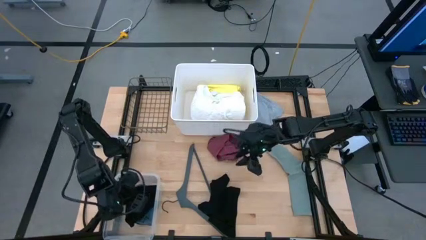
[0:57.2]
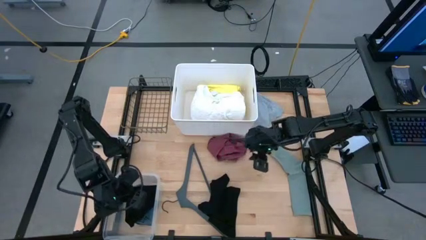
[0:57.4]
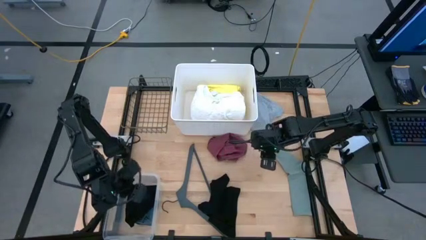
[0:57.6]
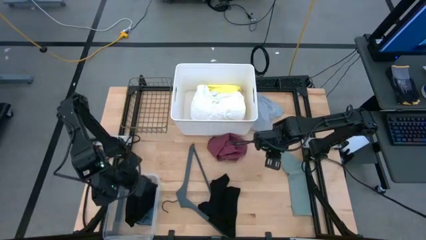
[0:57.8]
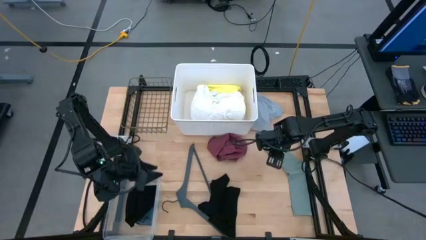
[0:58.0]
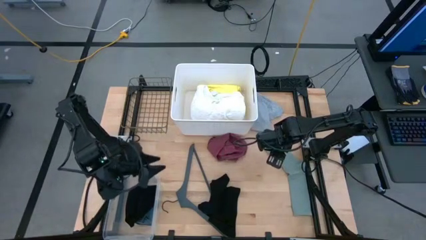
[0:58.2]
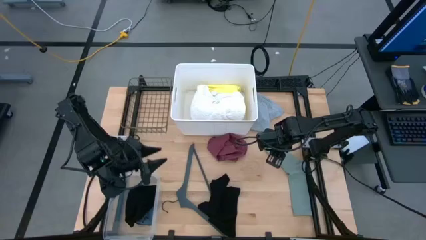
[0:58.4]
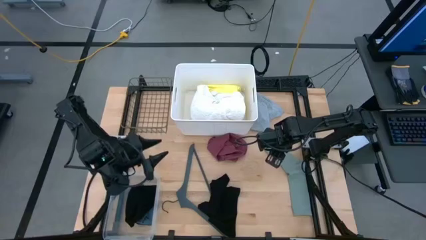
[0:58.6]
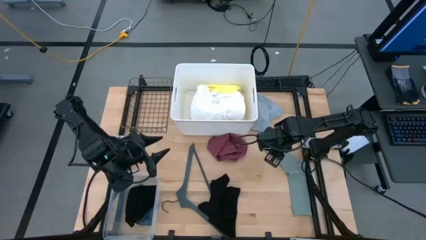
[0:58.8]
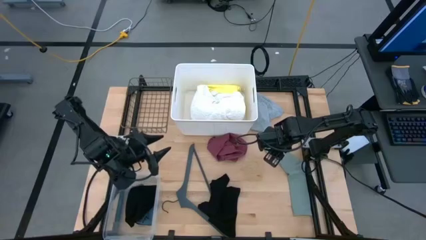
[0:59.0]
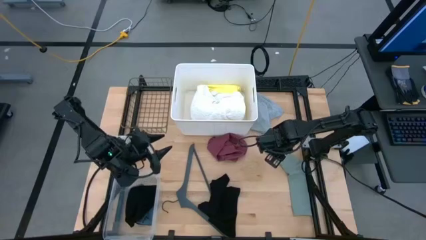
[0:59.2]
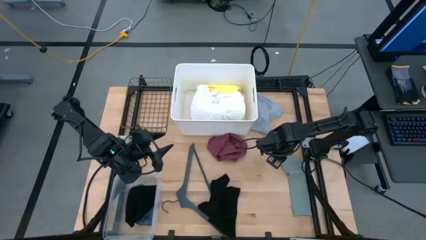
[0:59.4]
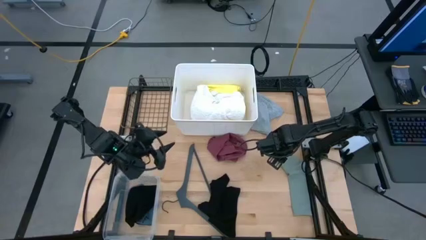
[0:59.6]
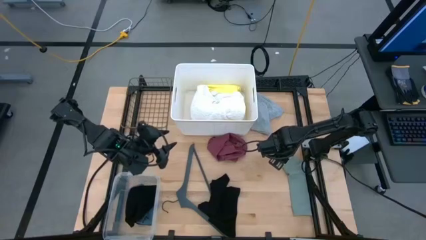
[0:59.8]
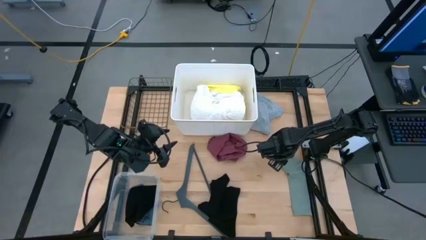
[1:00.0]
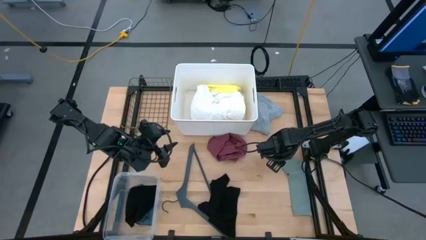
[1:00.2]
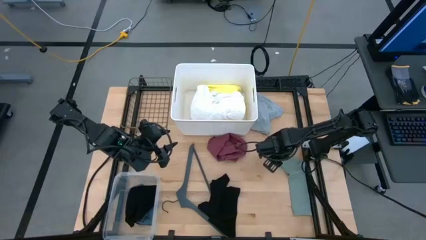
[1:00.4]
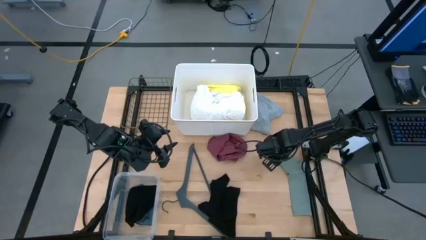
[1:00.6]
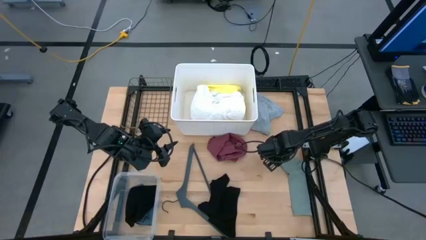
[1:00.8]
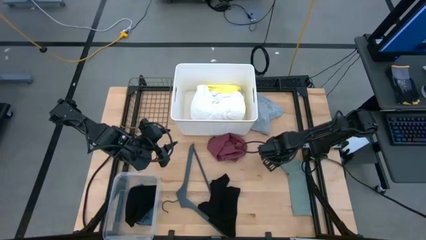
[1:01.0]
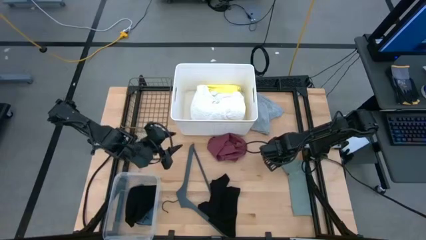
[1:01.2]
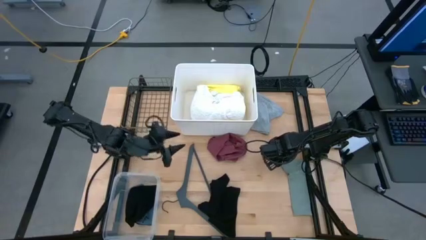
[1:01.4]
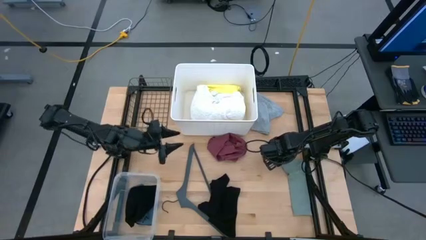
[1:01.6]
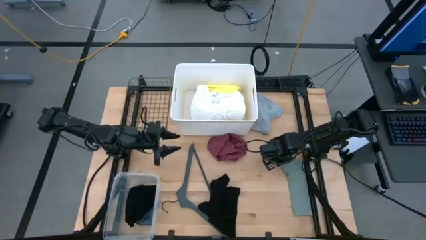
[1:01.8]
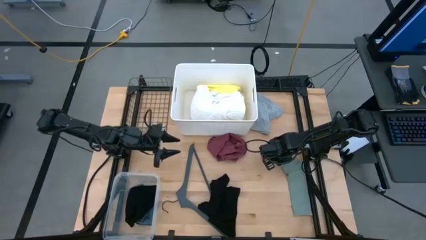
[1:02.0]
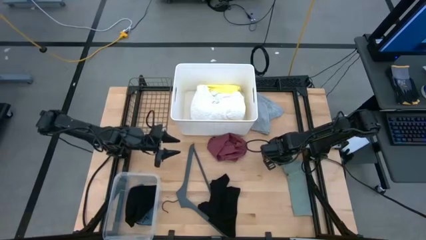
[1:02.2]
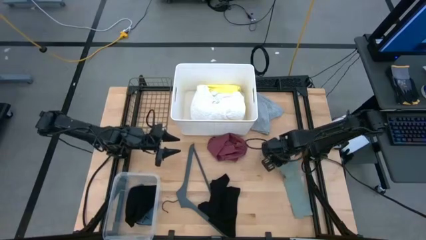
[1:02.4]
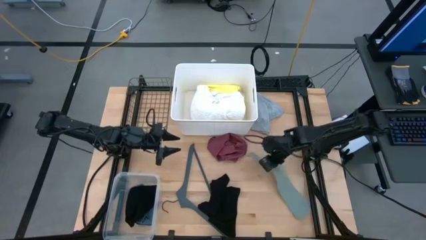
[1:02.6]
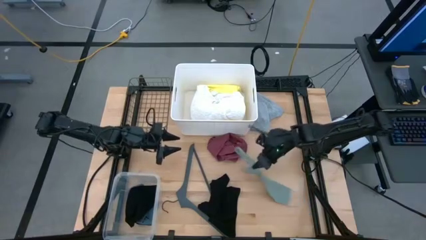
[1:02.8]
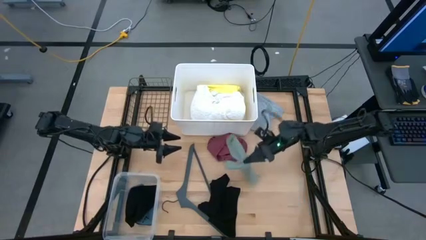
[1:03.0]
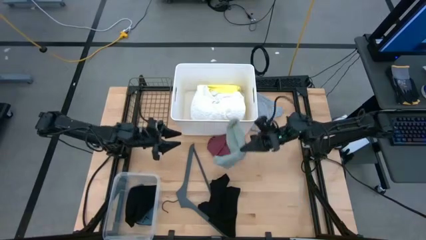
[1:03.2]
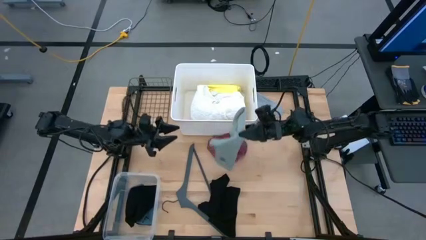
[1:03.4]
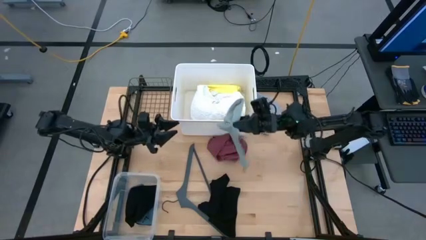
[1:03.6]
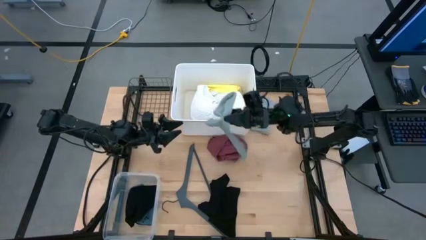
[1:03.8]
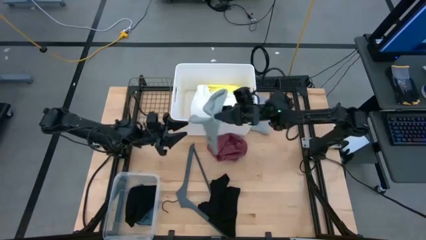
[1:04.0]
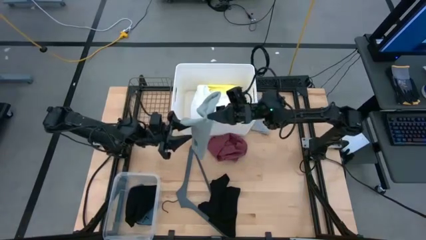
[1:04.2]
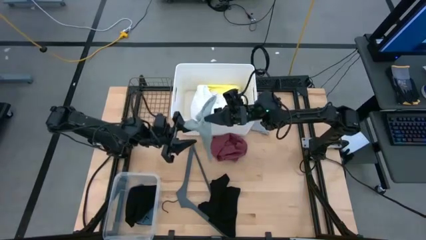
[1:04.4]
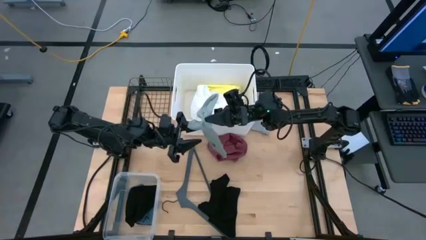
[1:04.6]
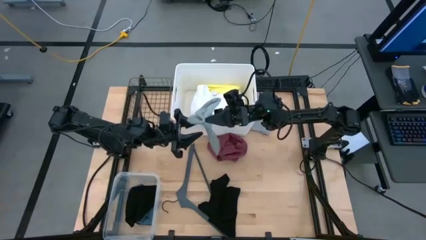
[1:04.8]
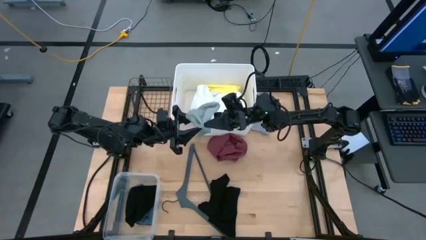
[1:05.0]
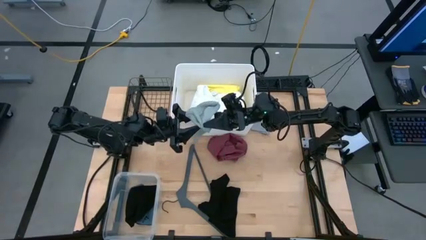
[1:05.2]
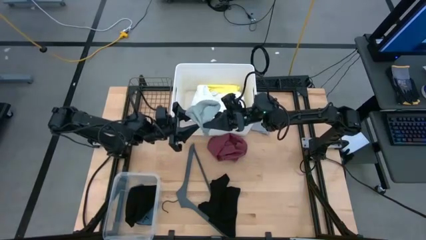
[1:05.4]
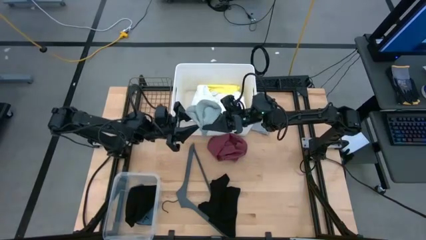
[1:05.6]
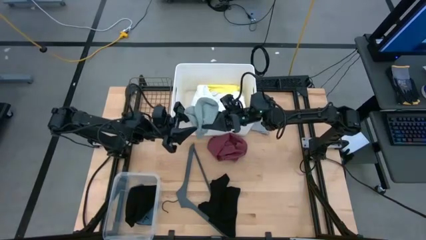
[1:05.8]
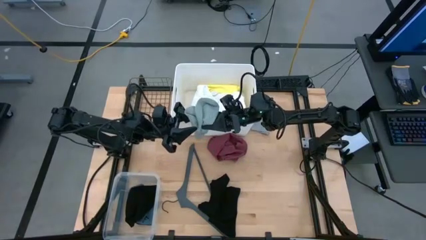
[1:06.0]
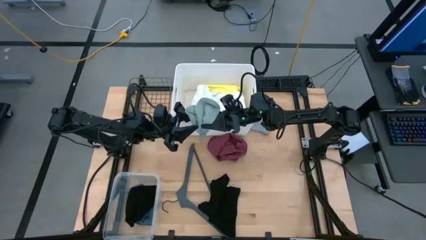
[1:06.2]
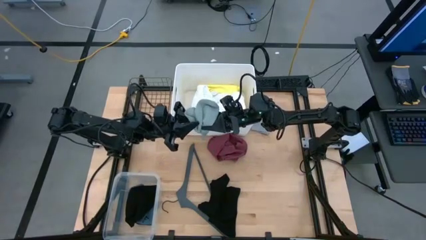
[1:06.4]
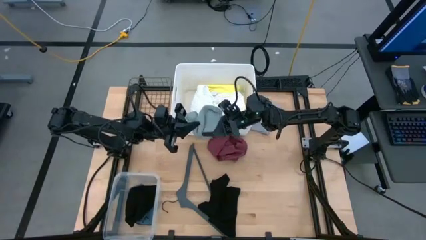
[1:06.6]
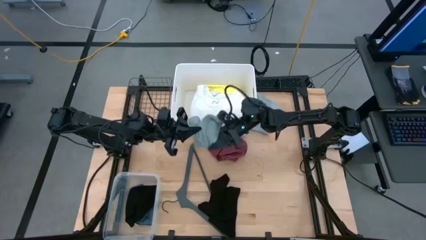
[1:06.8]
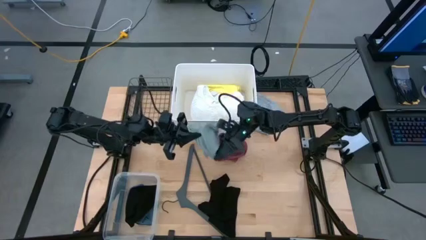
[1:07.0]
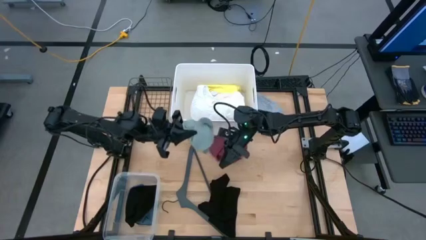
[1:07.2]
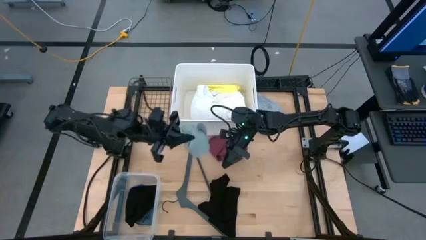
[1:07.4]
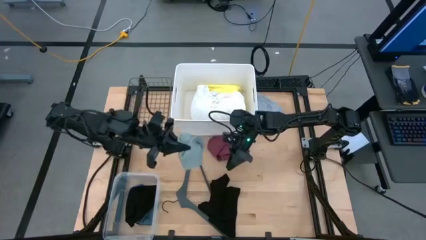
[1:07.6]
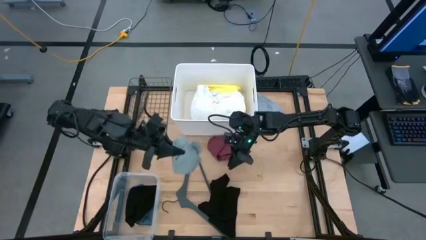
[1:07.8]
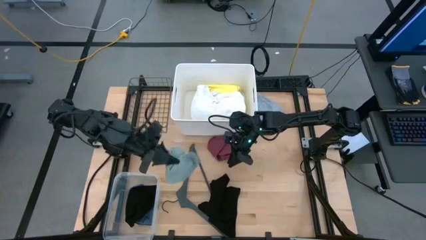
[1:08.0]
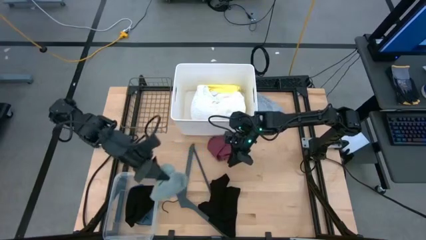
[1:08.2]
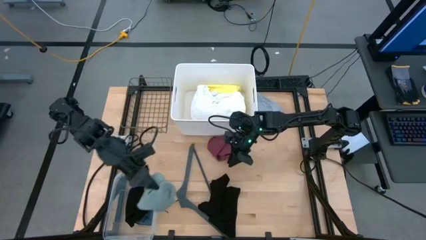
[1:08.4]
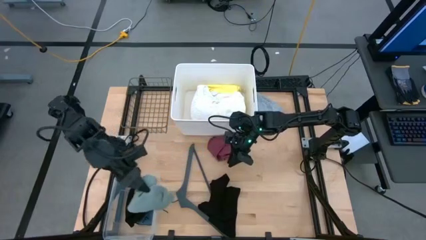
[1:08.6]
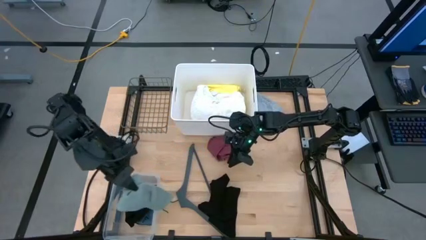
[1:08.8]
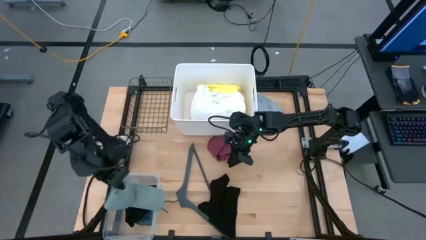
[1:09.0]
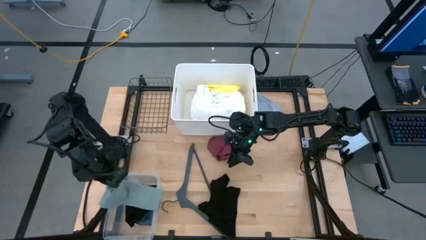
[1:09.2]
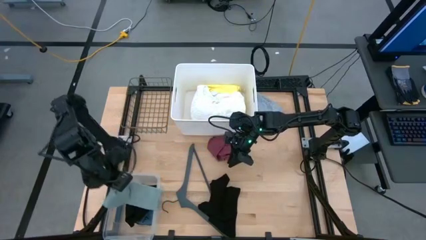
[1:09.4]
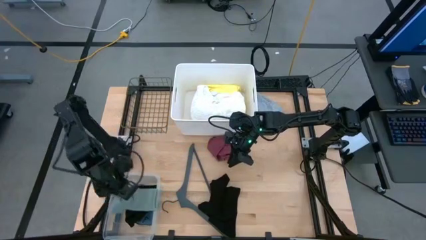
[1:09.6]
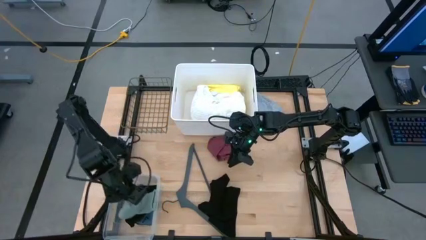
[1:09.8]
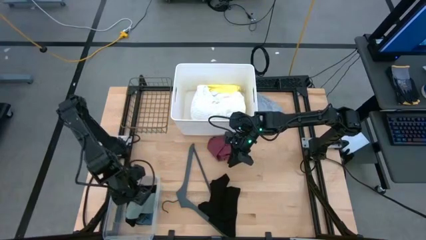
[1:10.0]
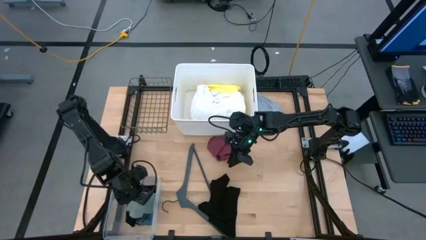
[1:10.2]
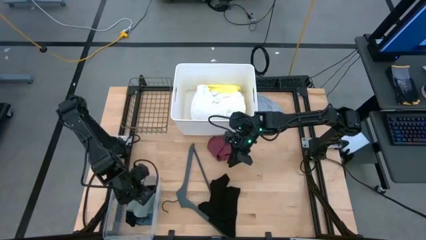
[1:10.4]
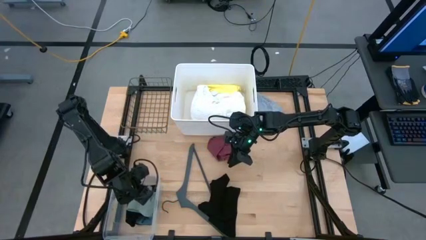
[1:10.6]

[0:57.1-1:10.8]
Task: Pick & Place Cloths
Put the gray sock into the transparent bin
